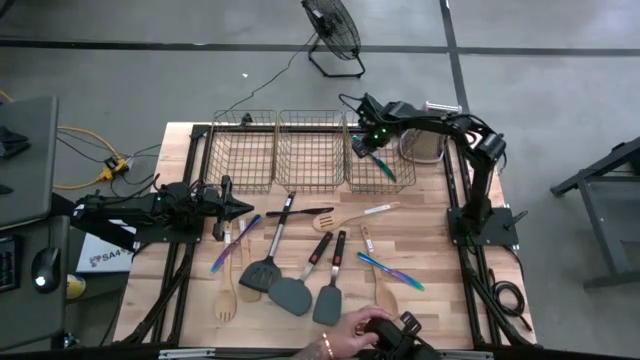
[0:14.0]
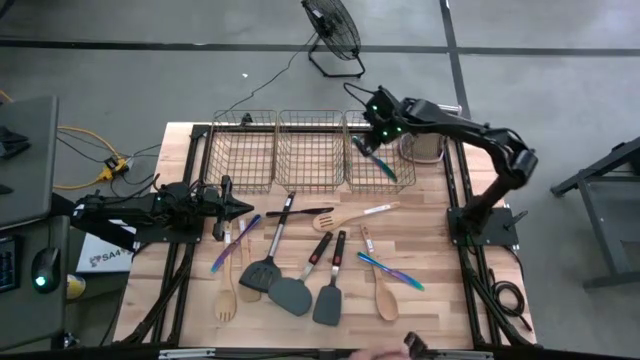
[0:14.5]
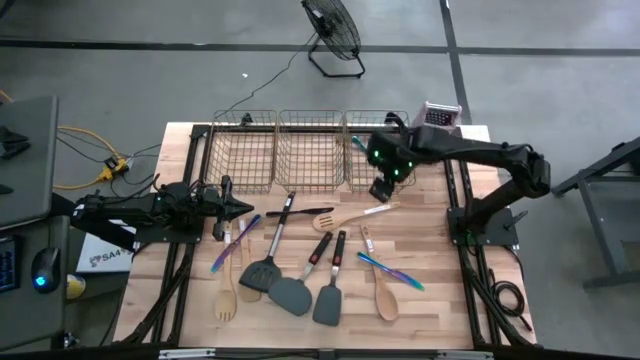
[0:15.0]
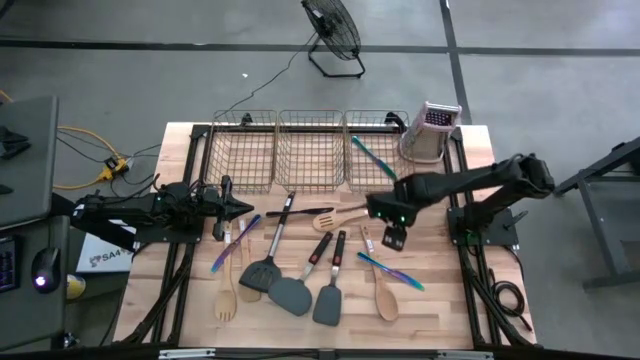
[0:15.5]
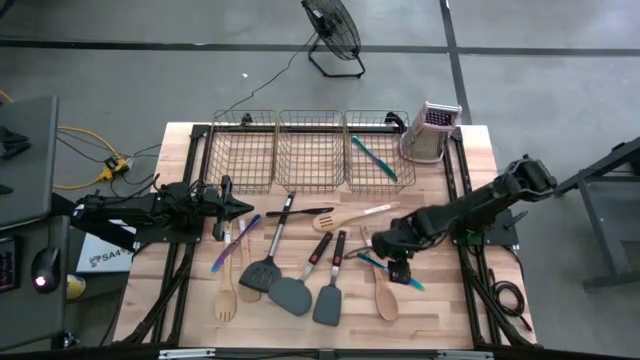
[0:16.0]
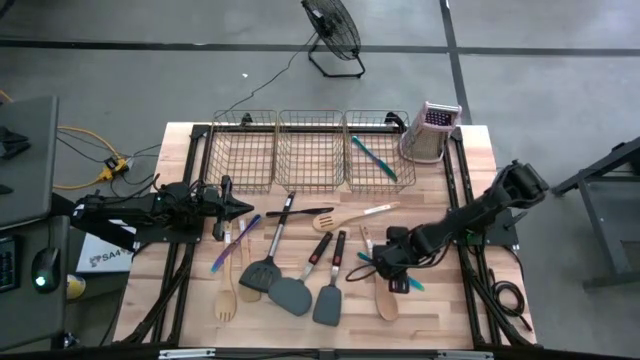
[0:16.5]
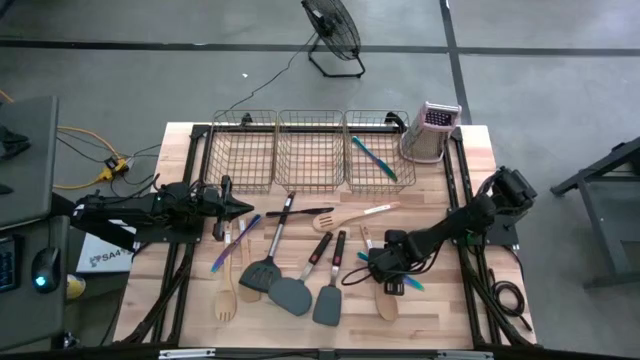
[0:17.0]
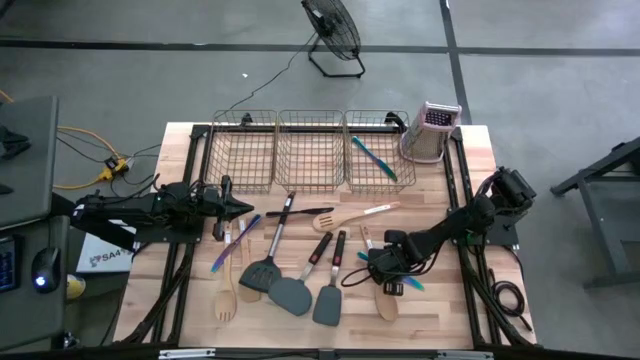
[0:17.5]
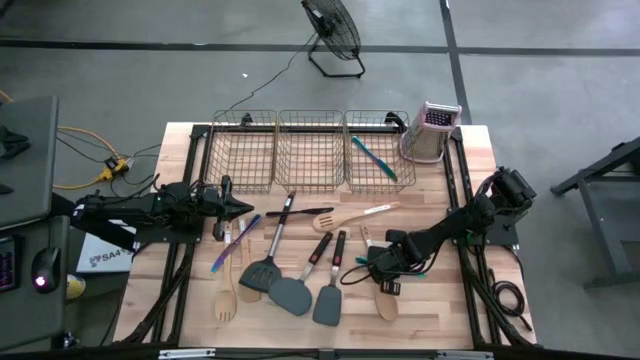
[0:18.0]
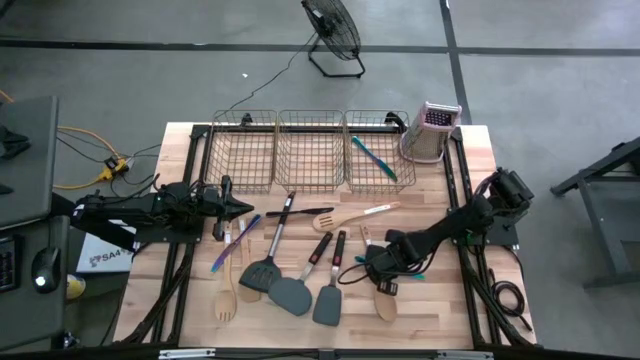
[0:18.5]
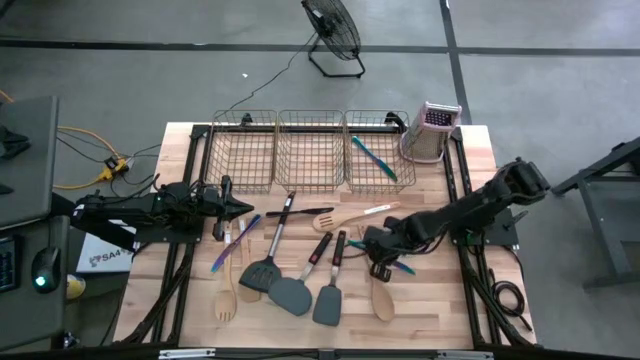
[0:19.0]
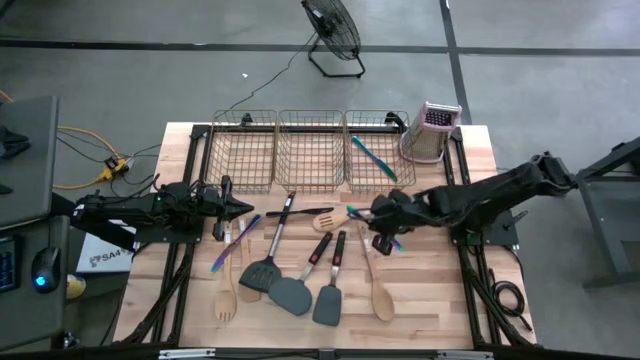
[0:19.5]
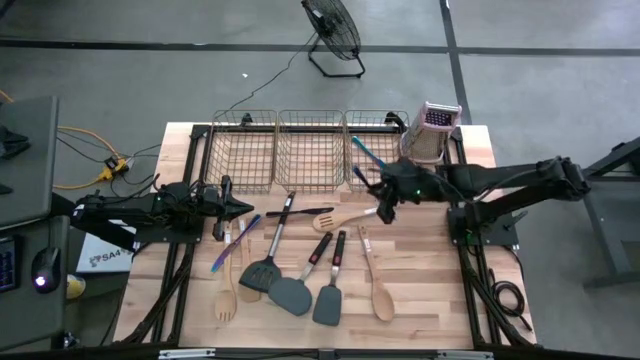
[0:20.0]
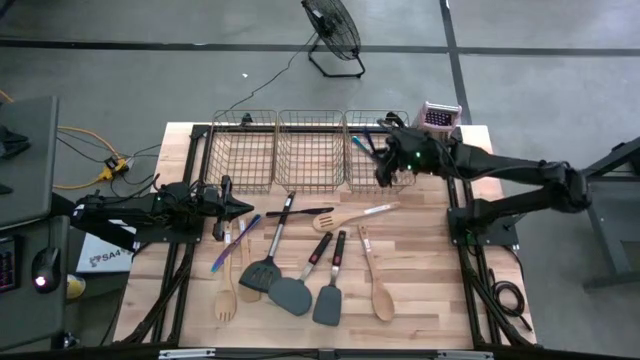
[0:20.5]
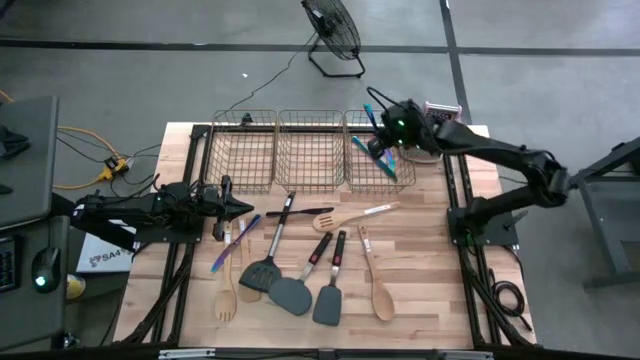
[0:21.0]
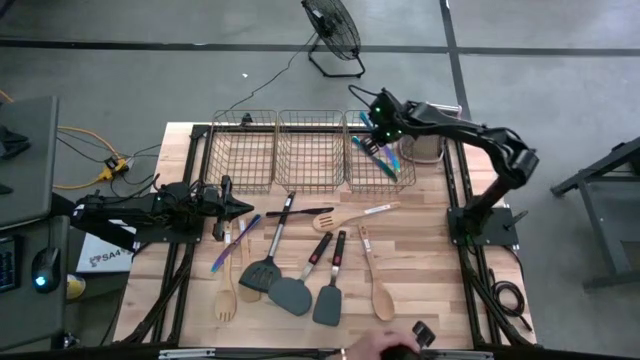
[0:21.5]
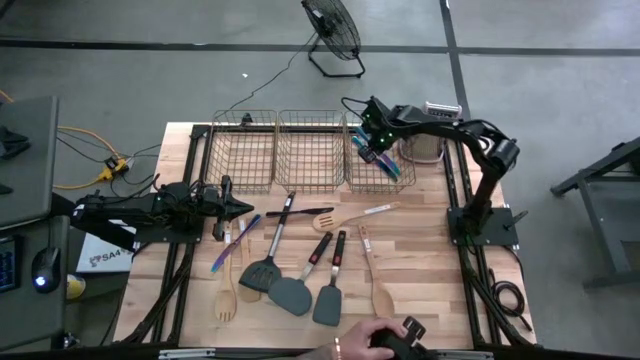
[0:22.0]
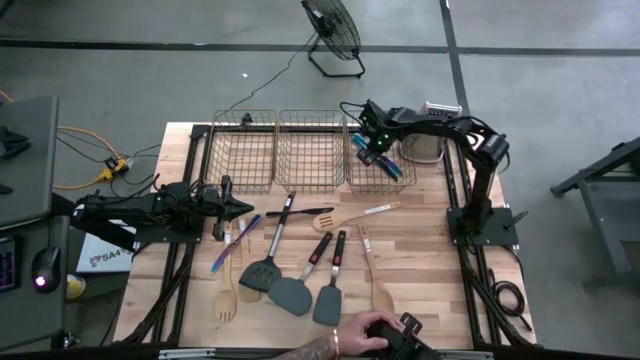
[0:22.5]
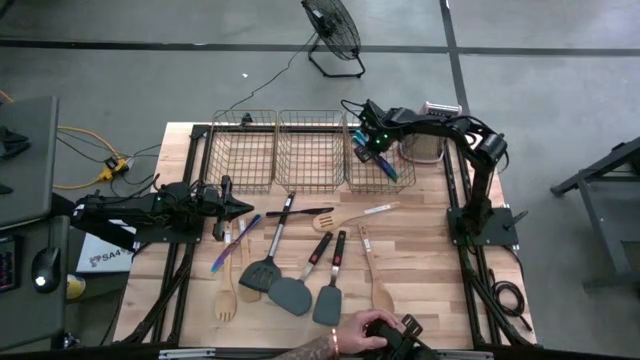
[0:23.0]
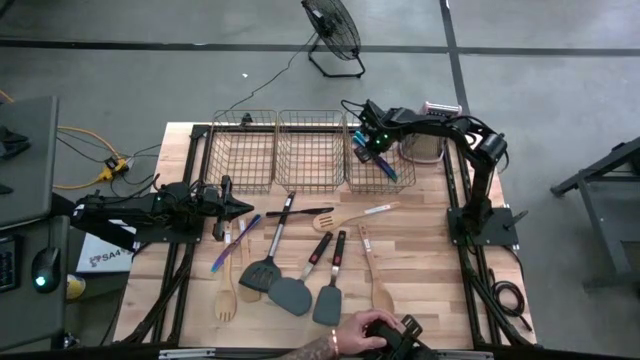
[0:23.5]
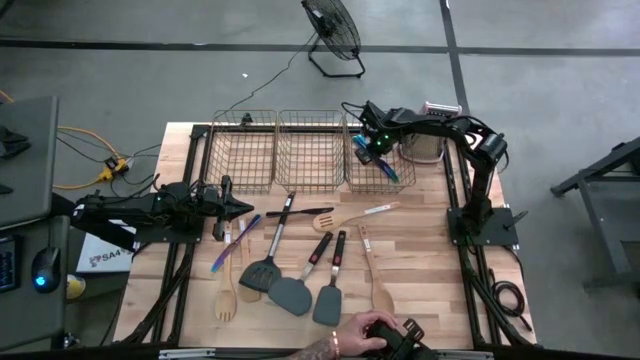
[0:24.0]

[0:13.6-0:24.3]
Task: Pick & Place Kitchen Items
Put the right blue knife into the right wire basket

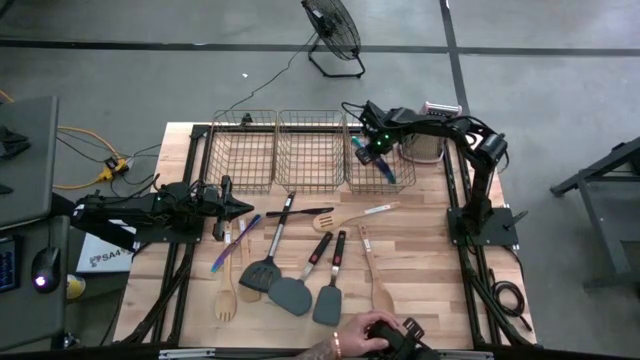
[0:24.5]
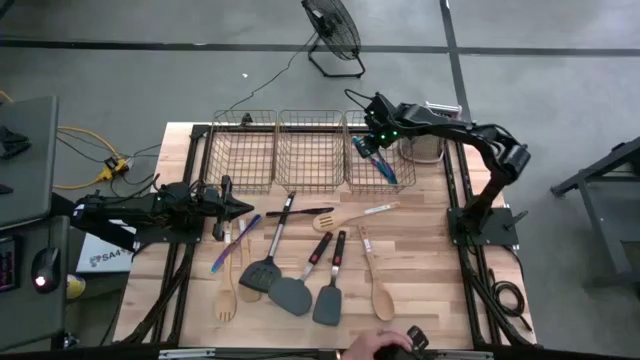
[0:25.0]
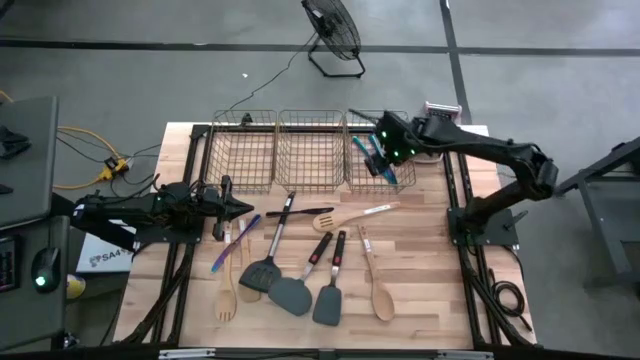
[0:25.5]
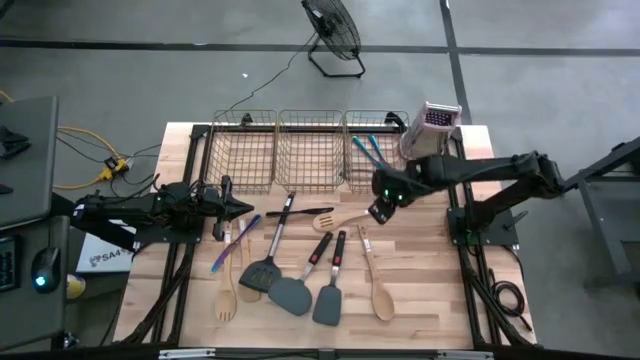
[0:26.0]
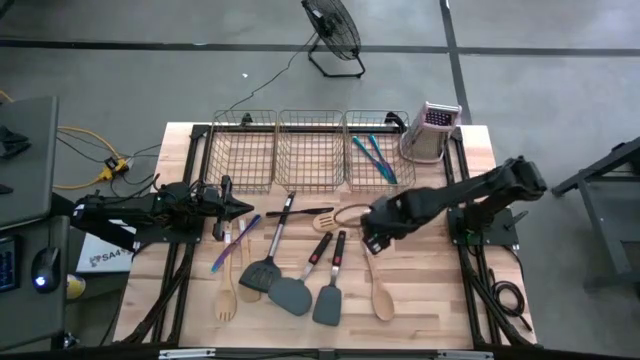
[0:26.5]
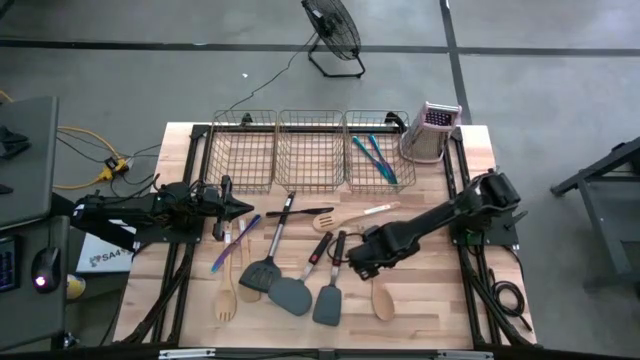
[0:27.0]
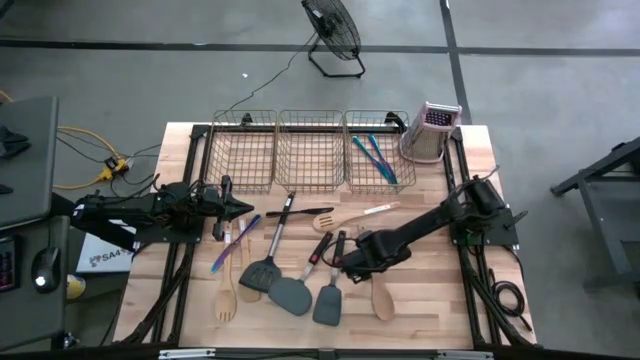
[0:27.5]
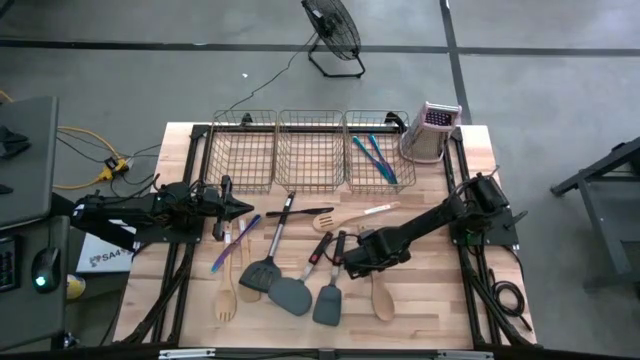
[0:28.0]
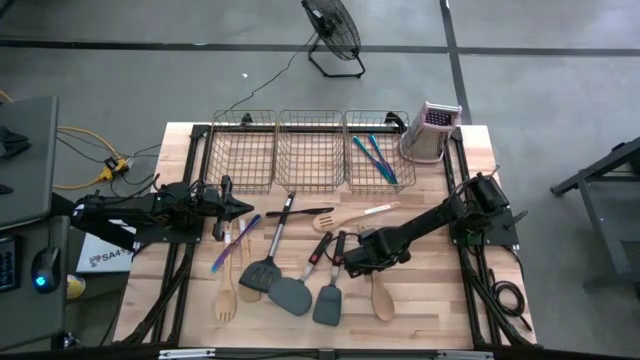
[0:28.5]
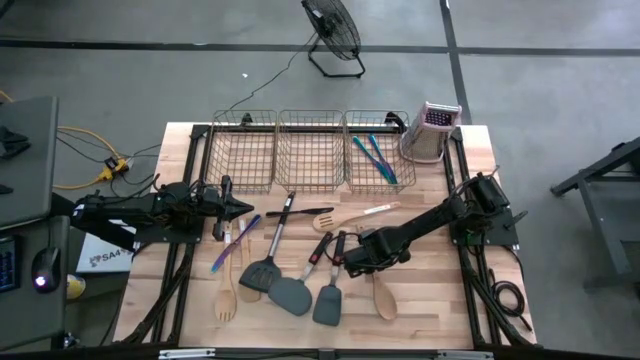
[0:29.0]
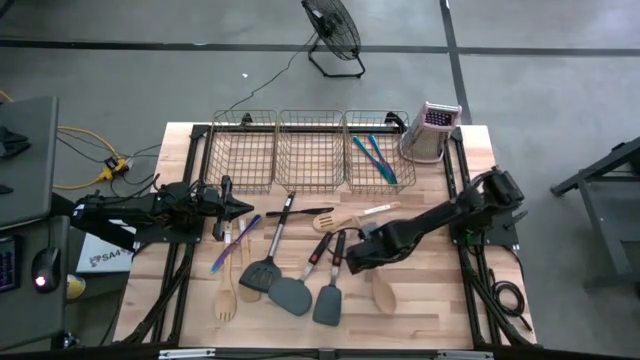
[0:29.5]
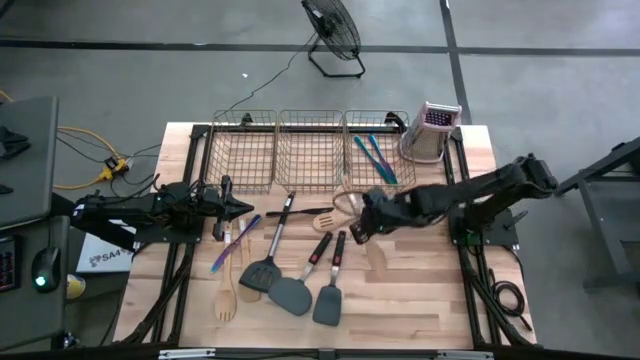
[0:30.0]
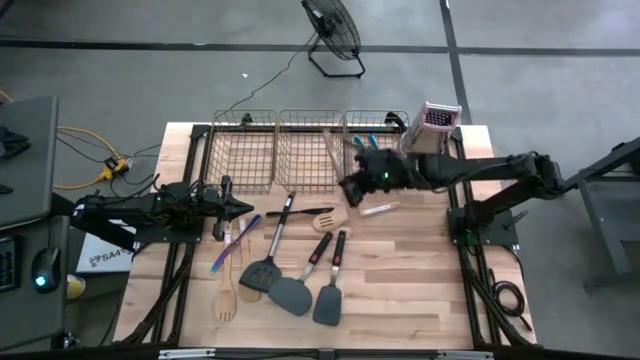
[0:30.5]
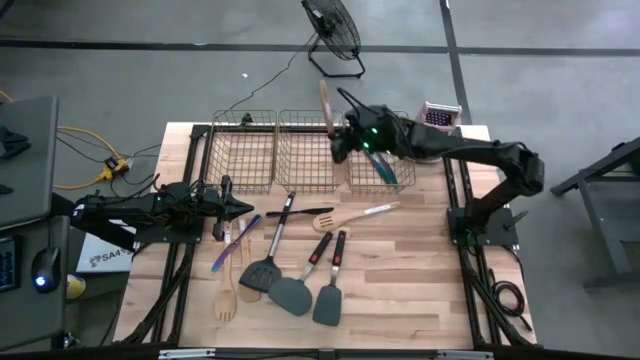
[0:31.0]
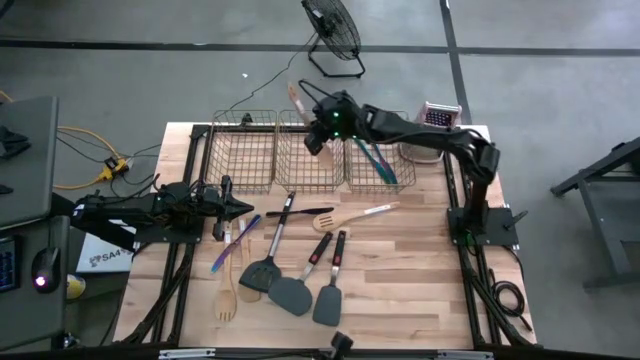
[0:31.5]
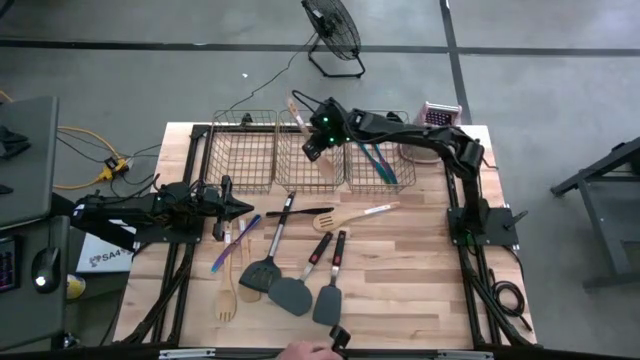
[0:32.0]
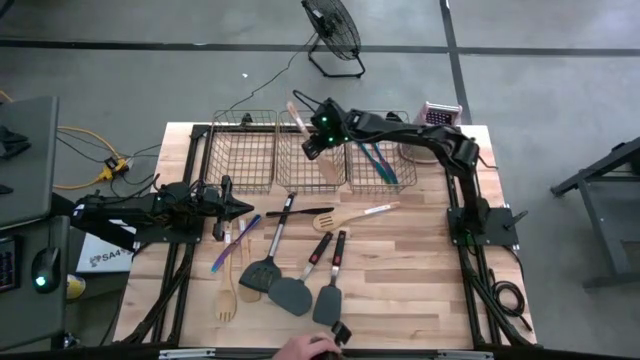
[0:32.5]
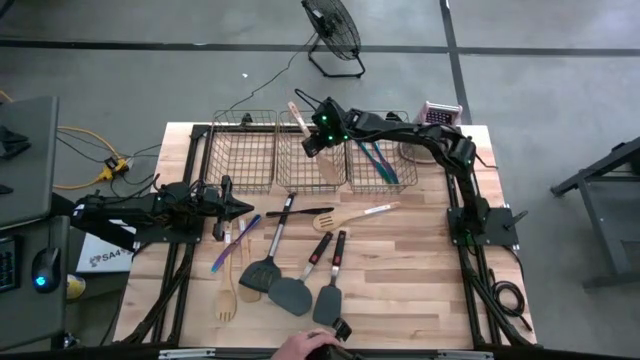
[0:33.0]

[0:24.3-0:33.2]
Put the brown serving spoon into the middle wire basket

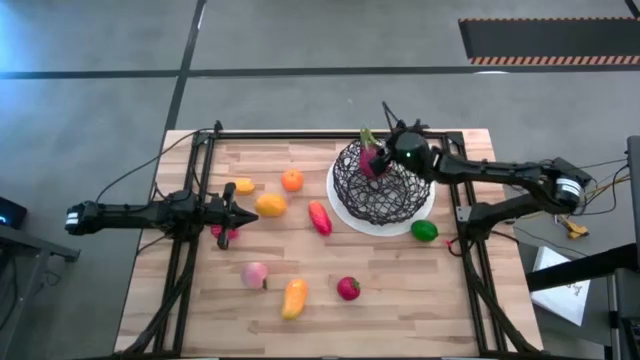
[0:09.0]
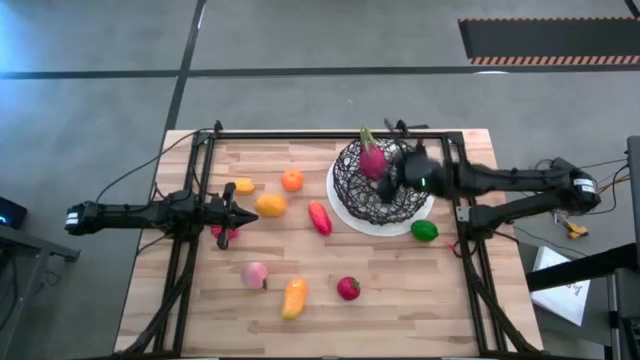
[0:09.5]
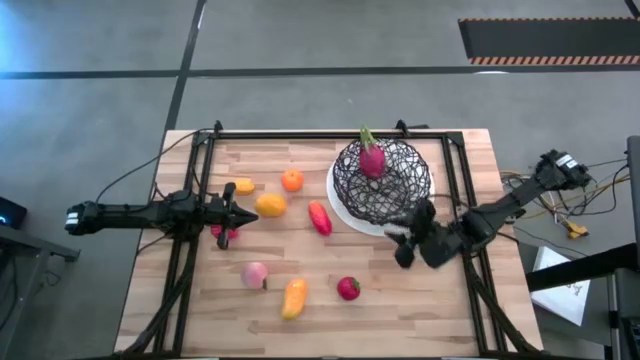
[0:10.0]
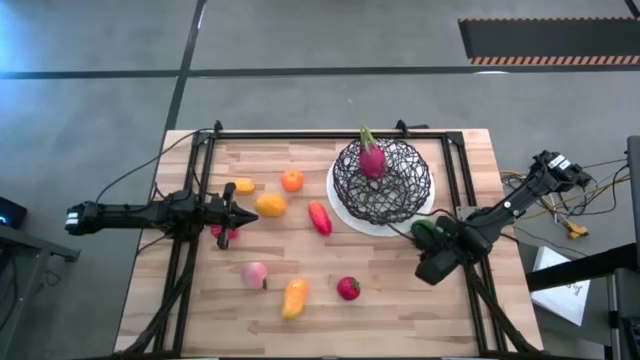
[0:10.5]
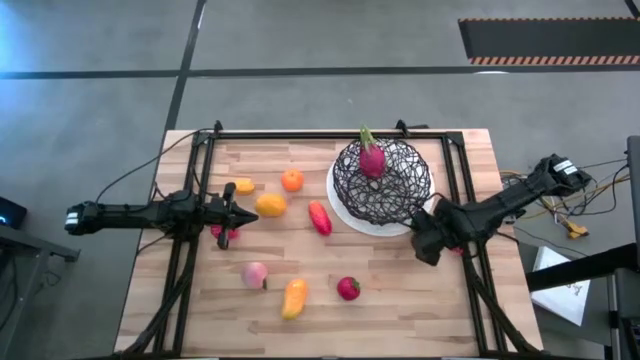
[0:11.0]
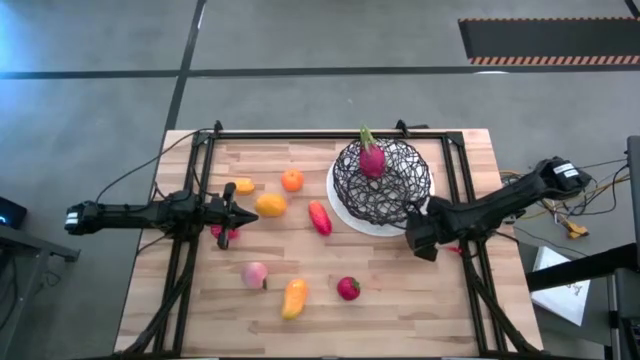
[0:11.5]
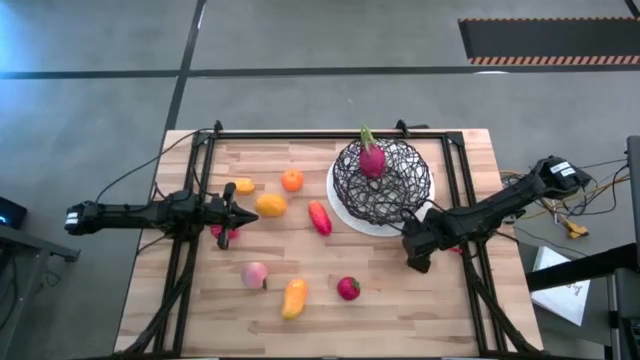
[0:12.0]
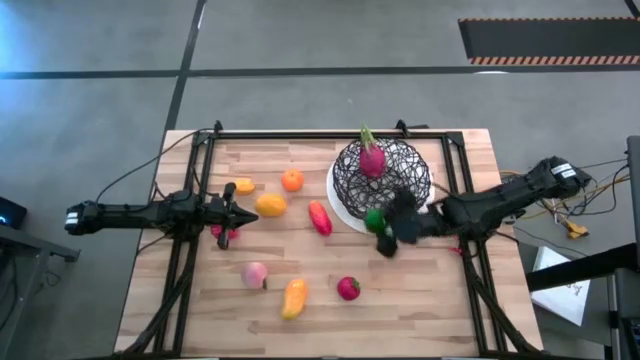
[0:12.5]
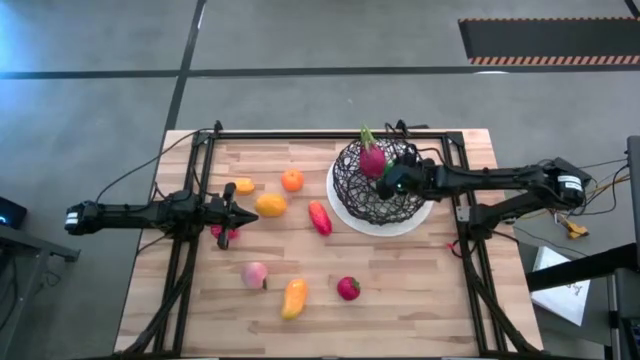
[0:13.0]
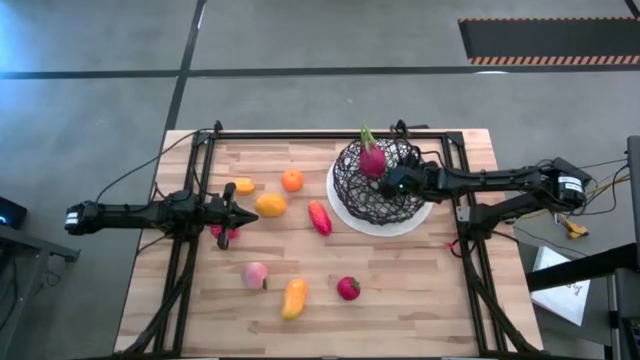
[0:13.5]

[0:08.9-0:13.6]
Task: Build produce basket
Put the lime into the black basket
